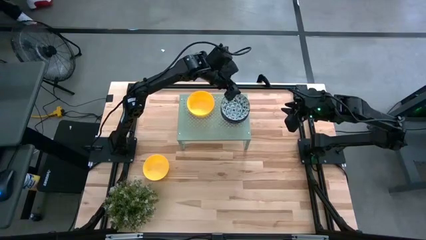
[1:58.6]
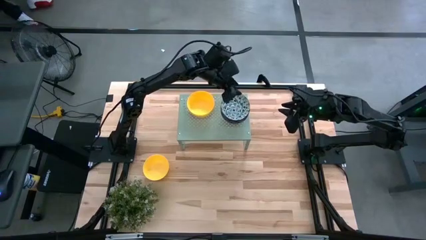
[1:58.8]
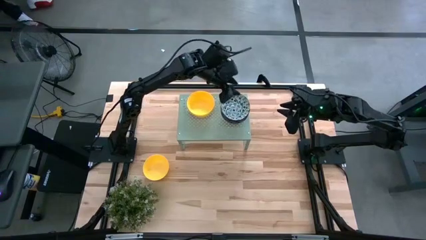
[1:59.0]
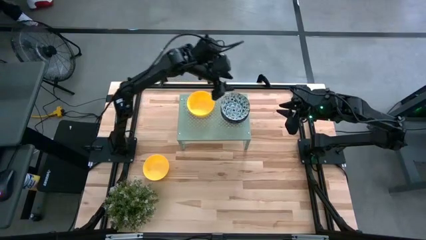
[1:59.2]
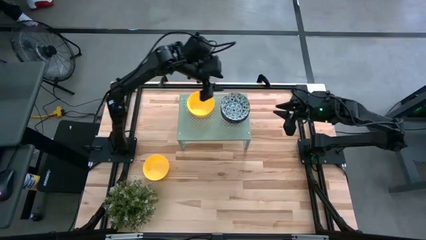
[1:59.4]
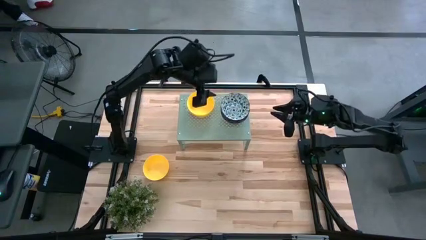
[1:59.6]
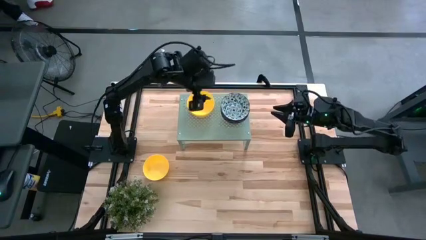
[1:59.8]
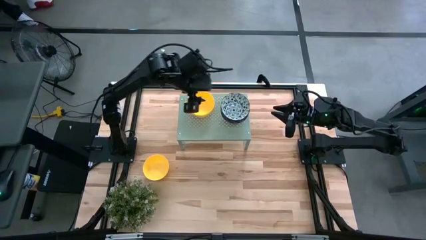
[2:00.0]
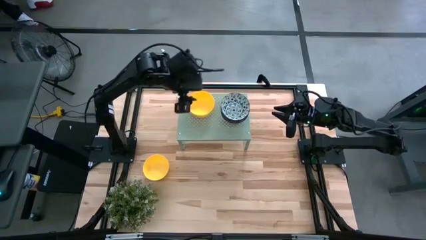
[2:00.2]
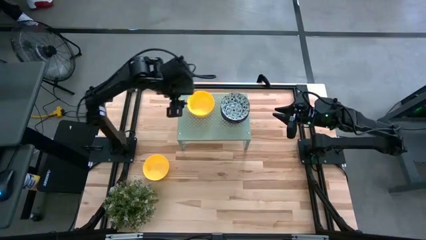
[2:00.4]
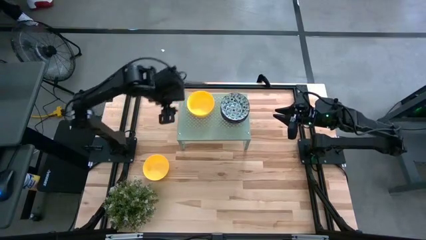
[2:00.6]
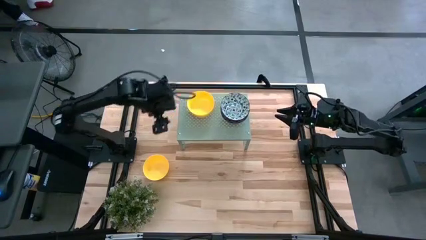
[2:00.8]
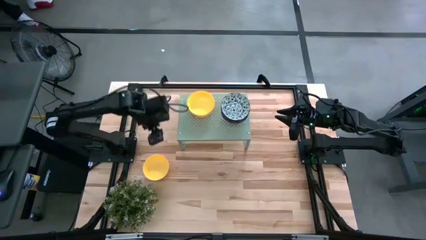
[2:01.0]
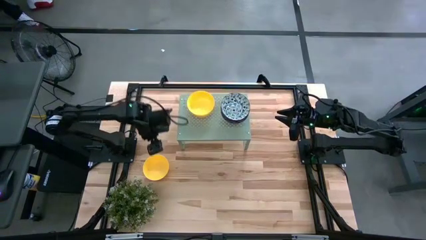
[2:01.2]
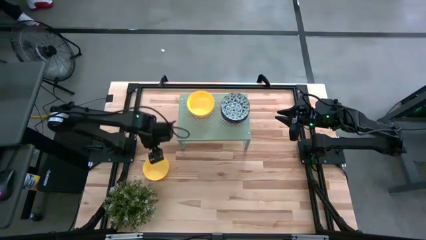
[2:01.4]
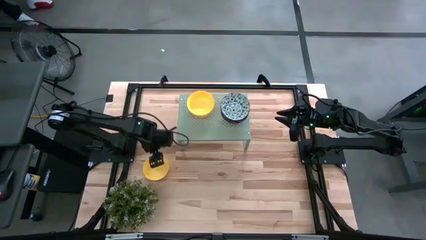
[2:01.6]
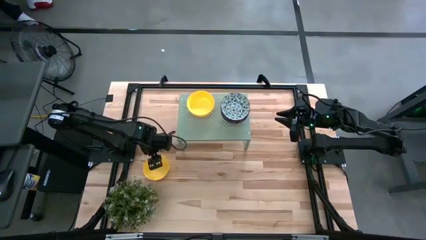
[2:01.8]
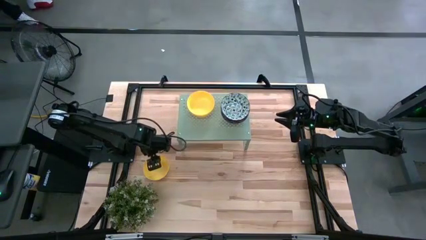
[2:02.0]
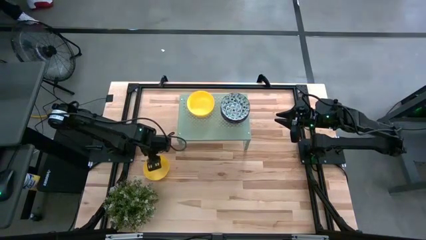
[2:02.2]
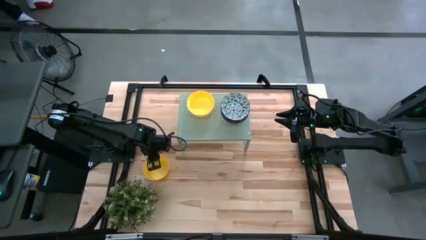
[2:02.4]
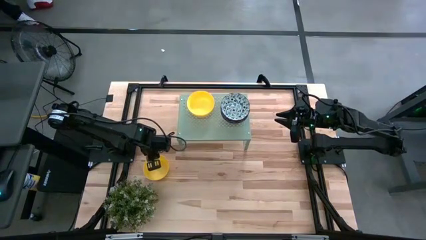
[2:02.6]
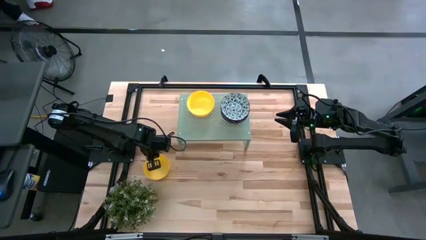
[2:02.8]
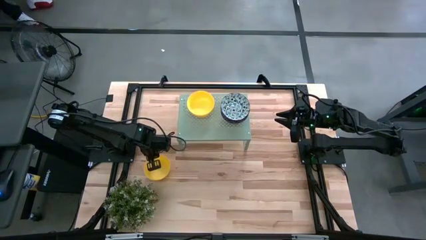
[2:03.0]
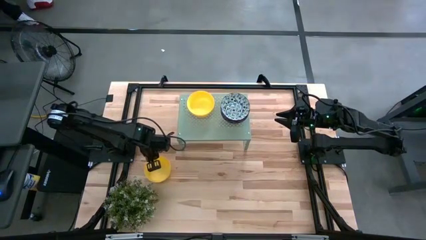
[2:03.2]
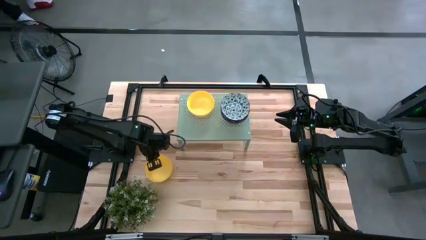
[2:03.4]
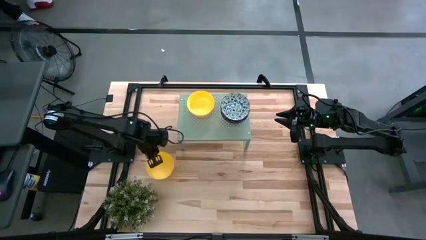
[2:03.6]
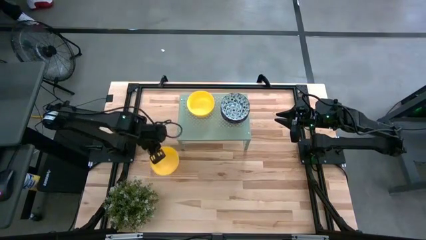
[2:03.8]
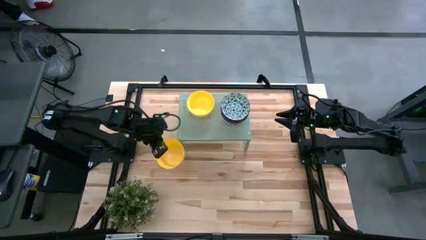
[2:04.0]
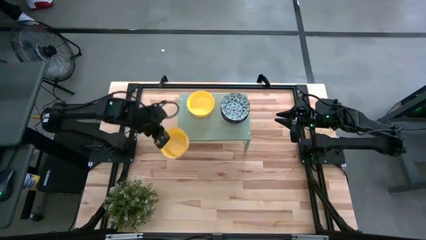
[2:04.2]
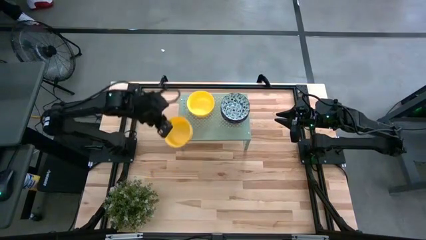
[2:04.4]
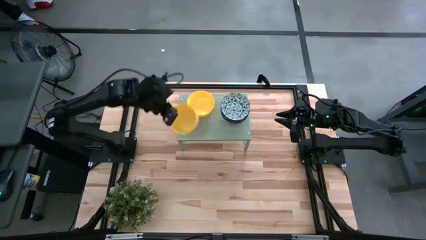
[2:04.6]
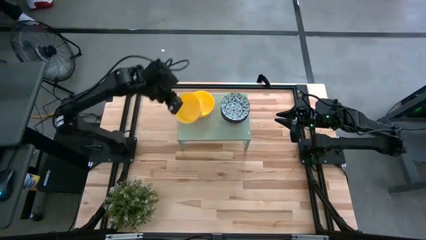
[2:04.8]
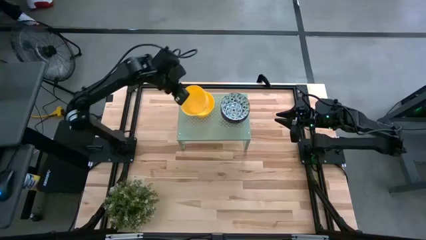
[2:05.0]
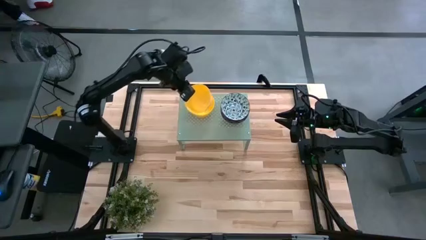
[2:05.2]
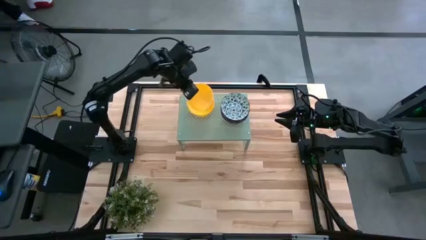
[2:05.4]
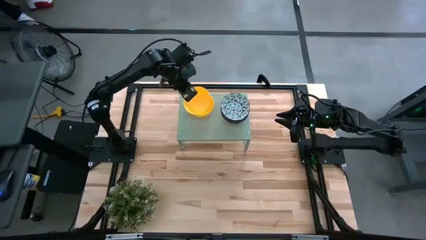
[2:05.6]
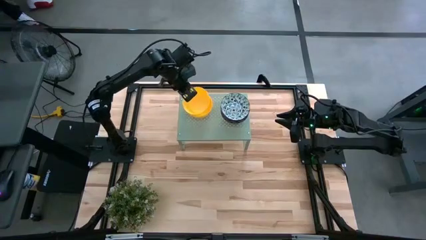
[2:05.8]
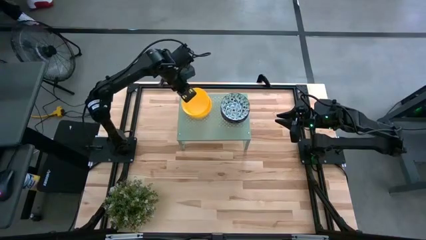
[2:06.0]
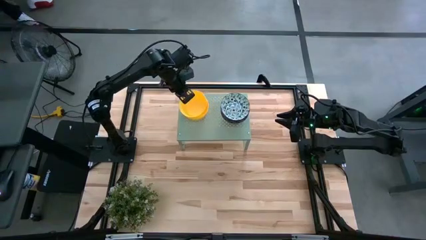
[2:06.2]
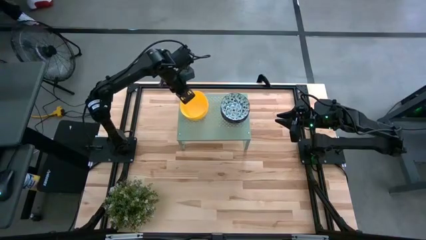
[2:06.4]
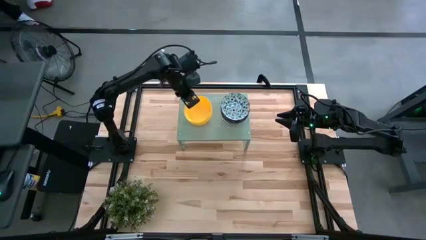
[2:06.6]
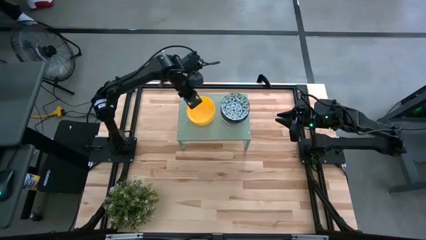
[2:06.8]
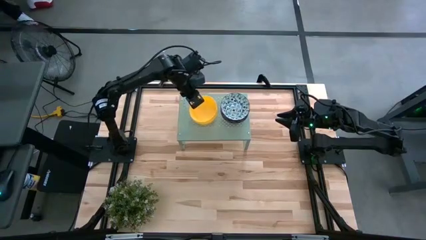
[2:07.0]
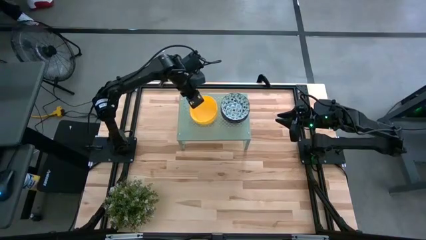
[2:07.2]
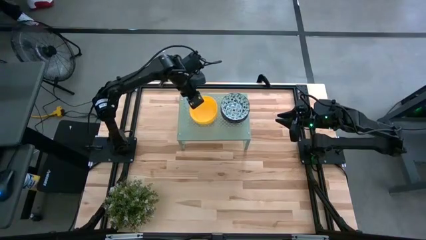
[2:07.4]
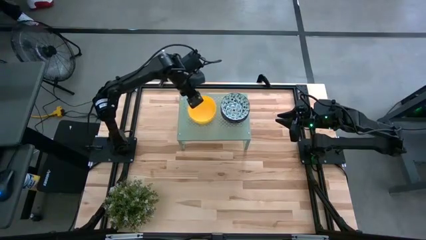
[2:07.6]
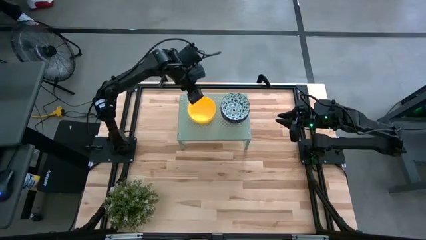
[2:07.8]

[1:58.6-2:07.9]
Task: Pick & Place Mini bowls
Stack the yellow bowl on top of the yellow bowls on the shelf

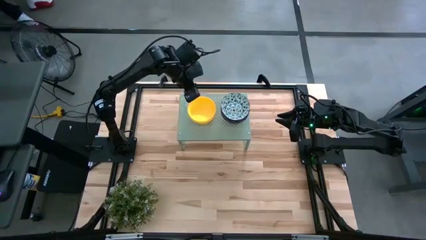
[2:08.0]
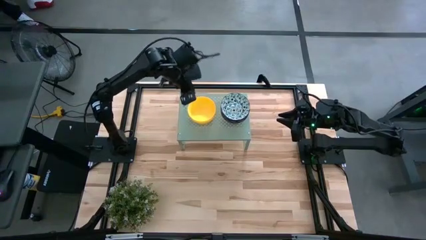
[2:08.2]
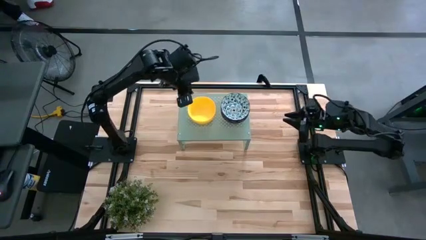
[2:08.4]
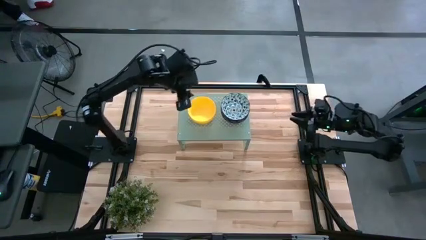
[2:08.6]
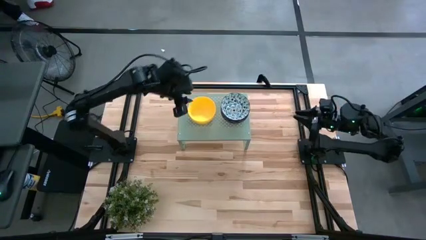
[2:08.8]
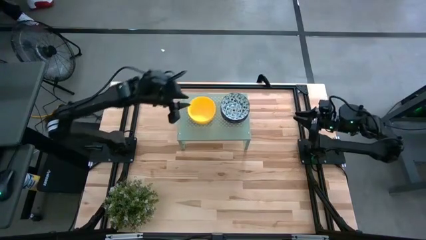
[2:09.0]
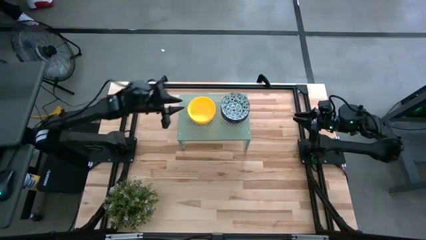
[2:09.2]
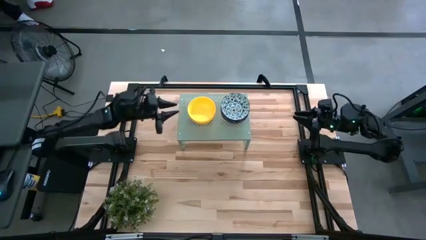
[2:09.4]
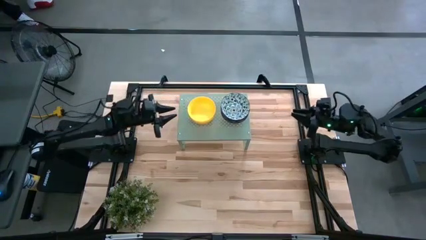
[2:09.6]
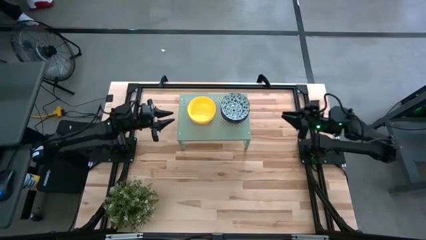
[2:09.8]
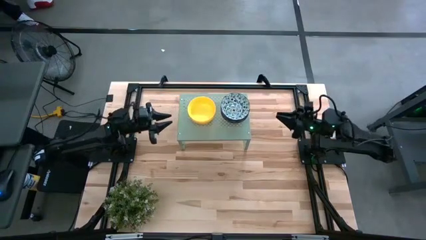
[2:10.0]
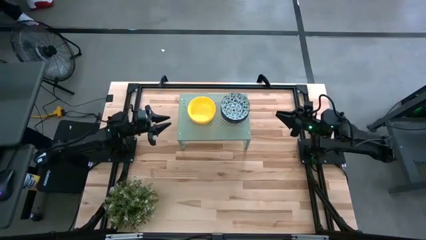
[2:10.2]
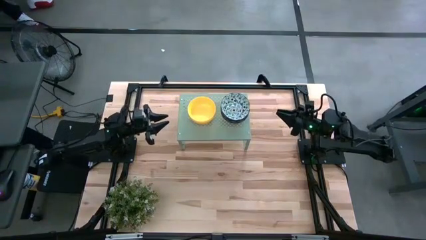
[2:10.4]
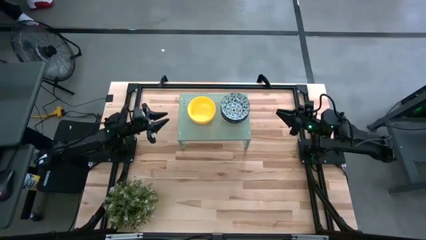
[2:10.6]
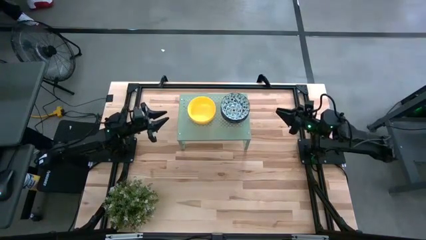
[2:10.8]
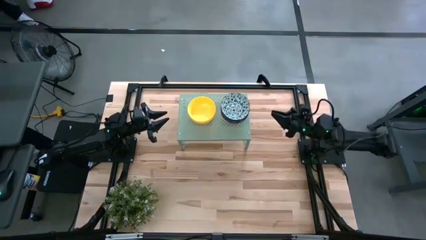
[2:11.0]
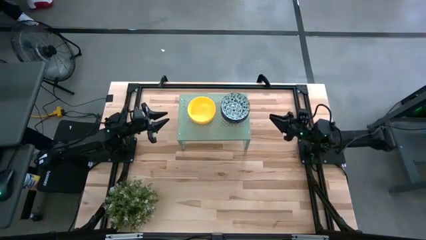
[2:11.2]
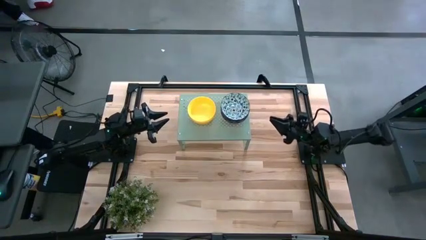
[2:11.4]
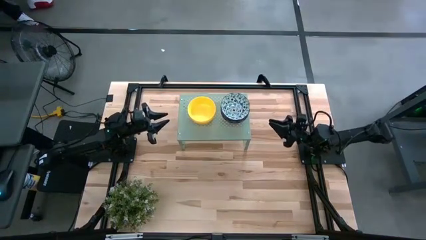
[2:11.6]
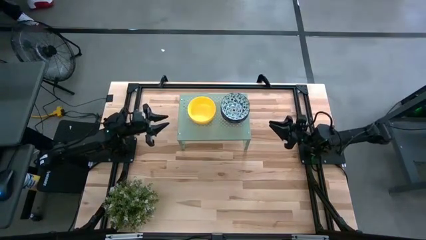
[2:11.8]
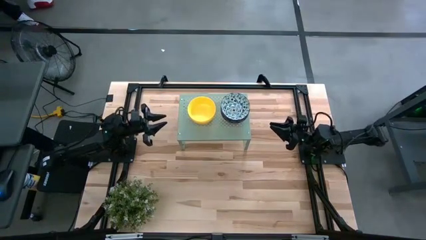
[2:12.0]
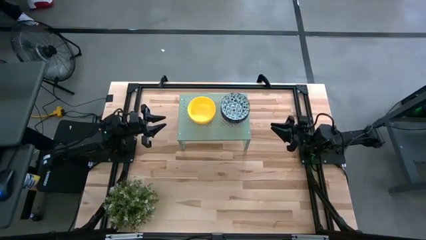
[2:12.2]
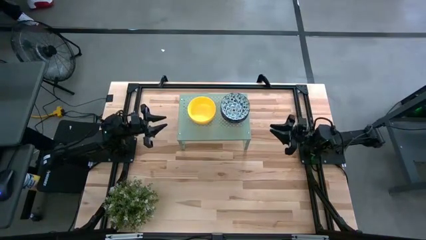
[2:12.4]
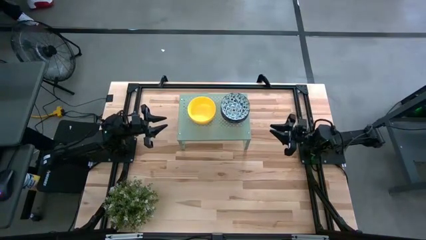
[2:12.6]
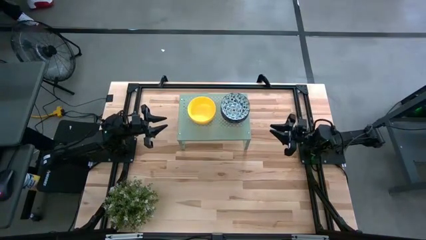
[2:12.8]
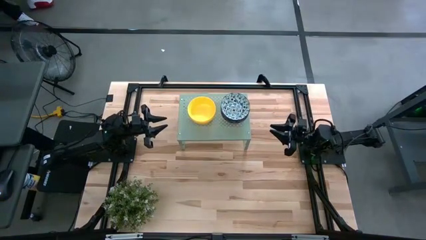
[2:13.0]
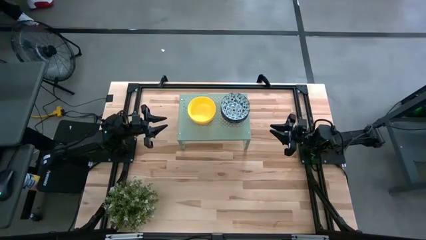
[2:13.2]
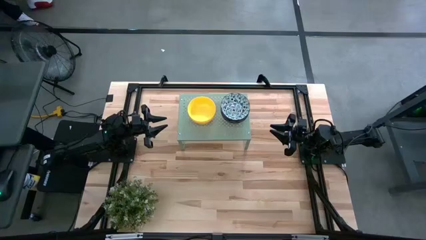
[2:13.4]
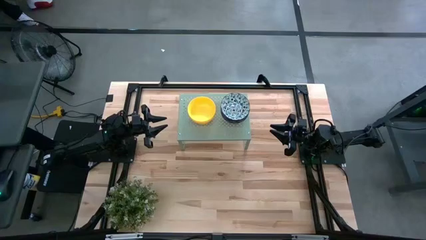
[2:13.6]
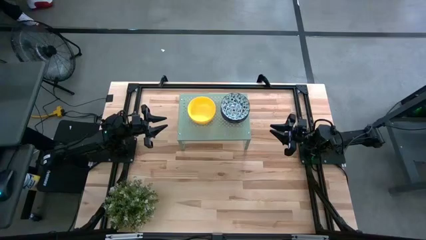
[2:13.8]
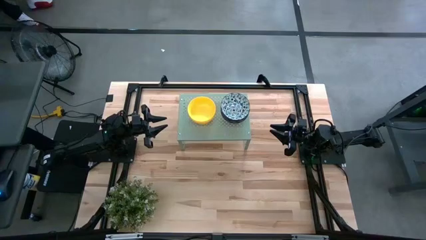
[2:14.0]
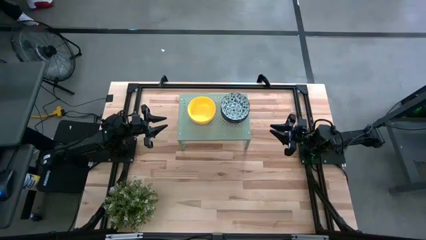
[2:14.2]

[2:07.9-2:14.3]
Return to Home Position
